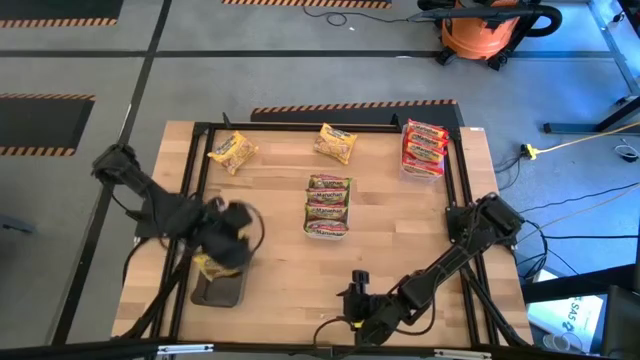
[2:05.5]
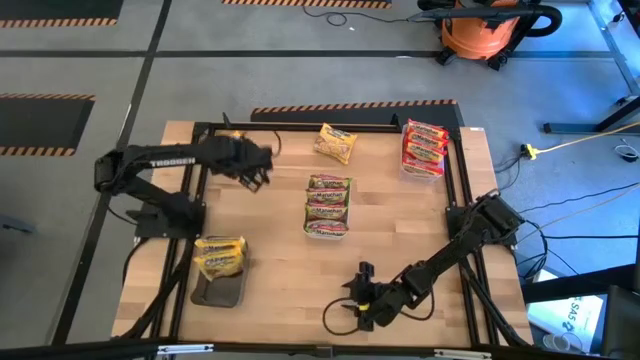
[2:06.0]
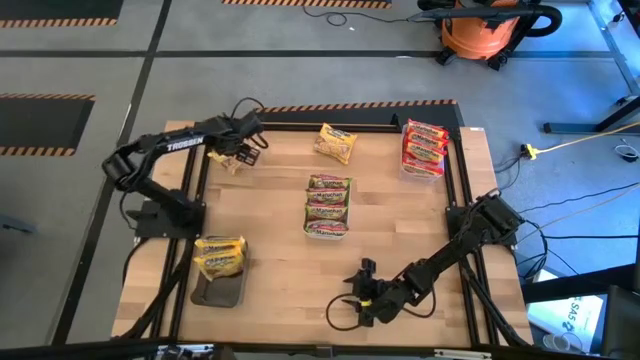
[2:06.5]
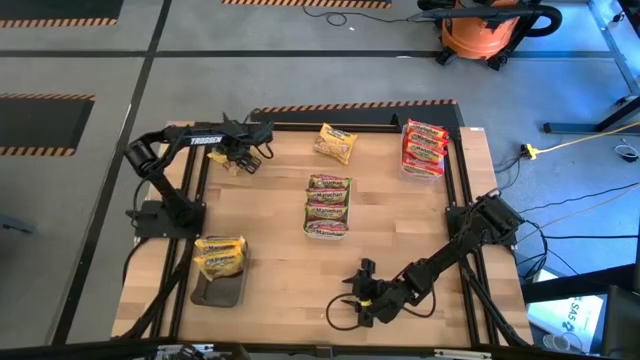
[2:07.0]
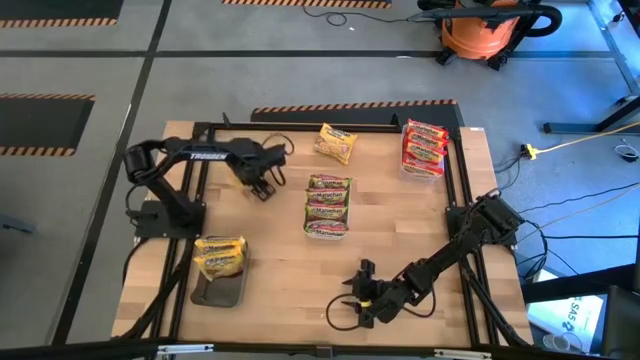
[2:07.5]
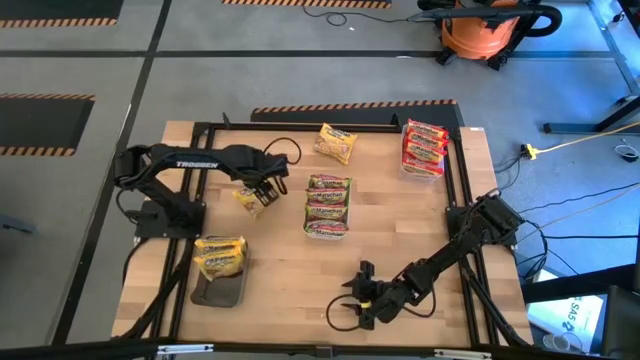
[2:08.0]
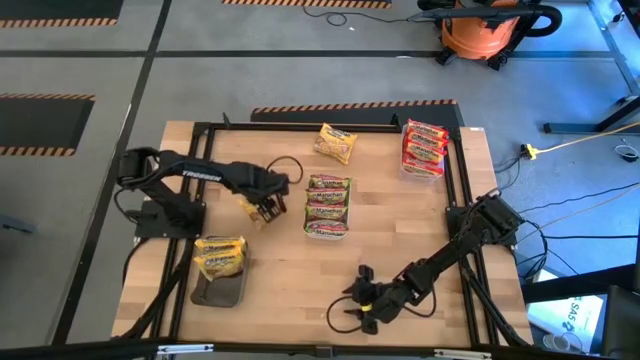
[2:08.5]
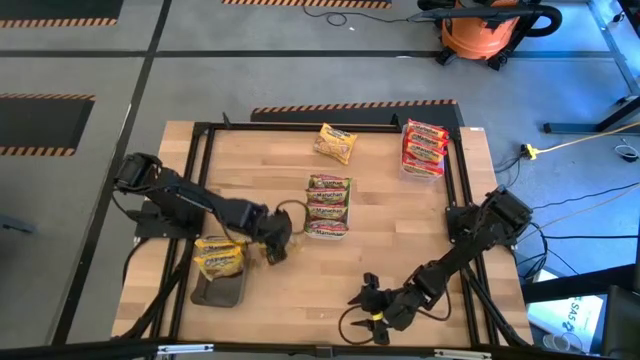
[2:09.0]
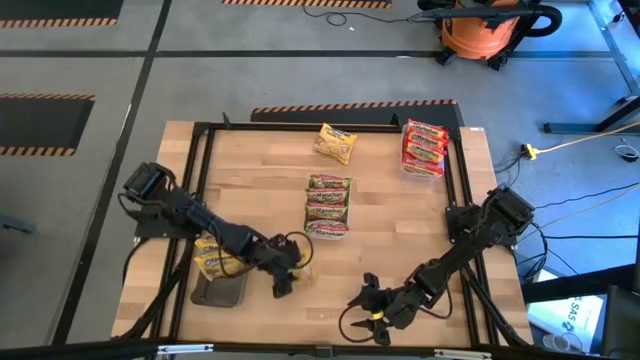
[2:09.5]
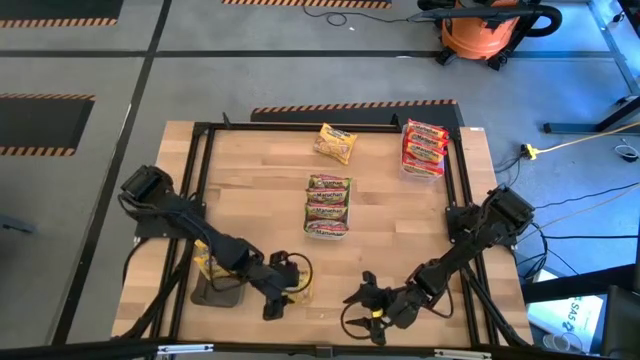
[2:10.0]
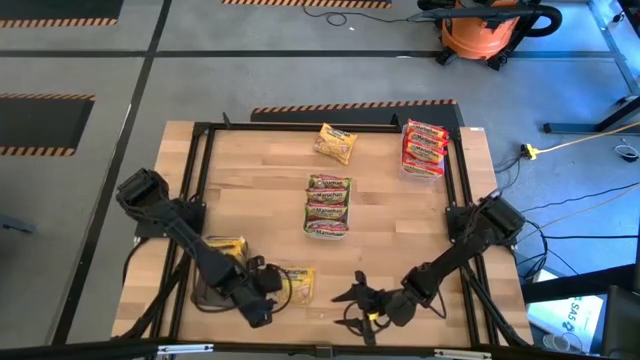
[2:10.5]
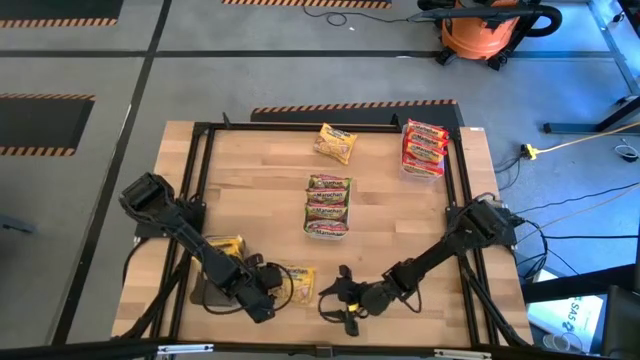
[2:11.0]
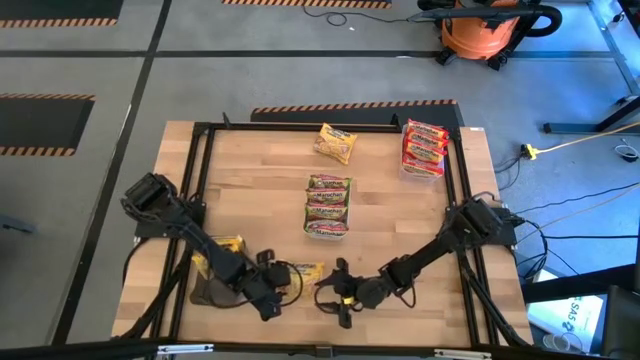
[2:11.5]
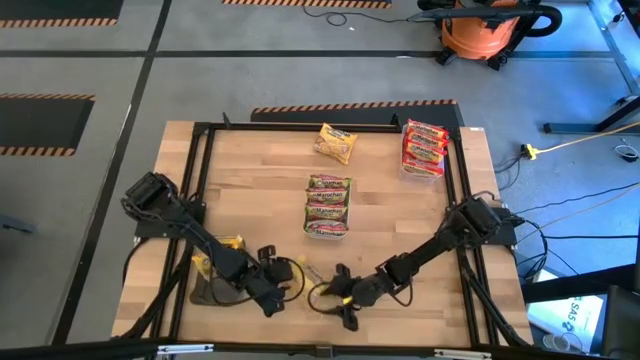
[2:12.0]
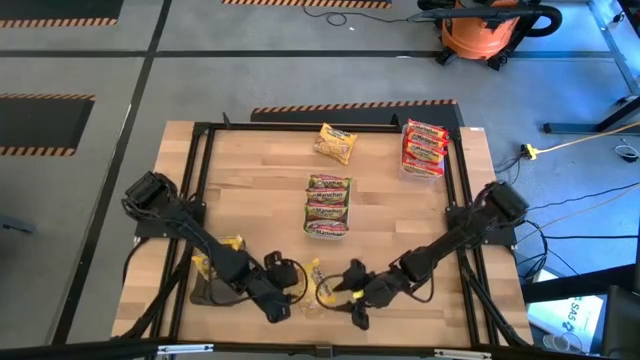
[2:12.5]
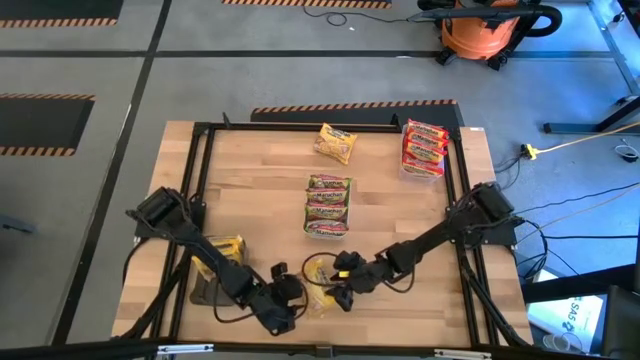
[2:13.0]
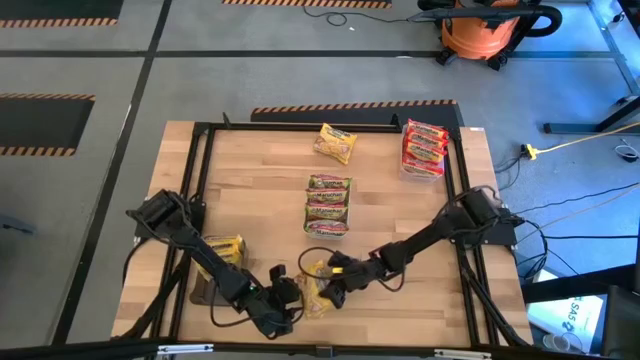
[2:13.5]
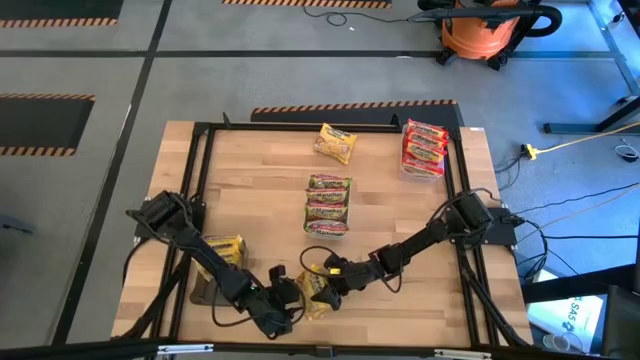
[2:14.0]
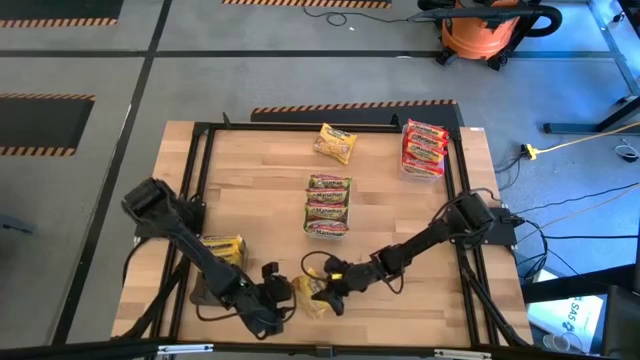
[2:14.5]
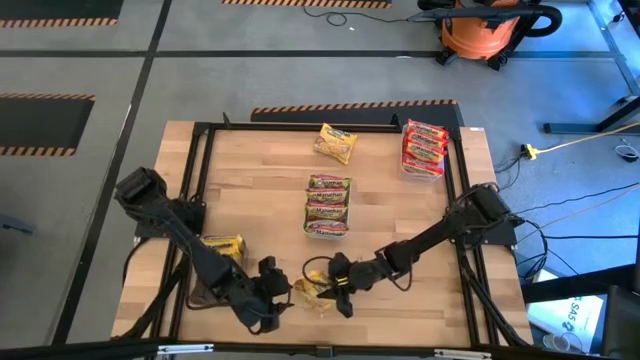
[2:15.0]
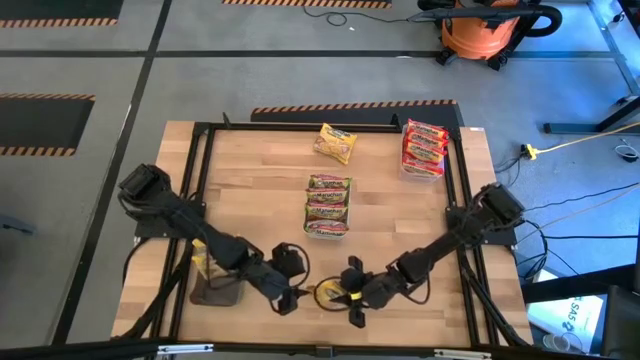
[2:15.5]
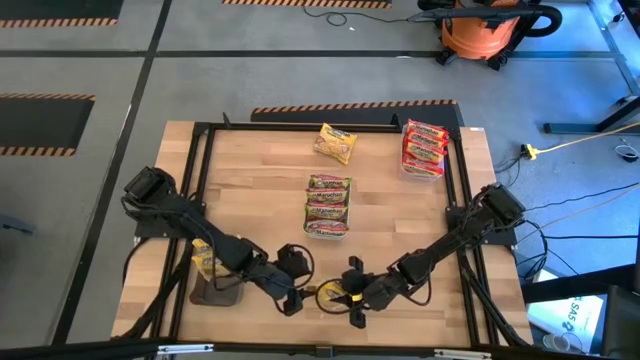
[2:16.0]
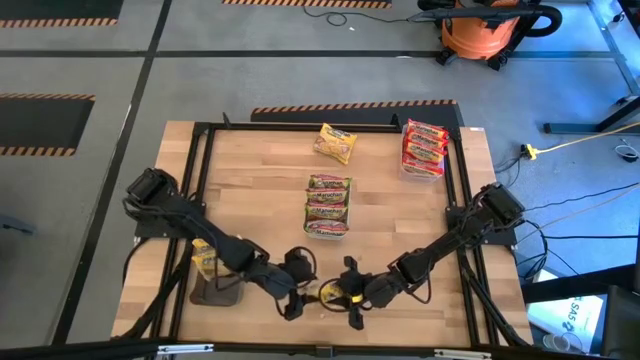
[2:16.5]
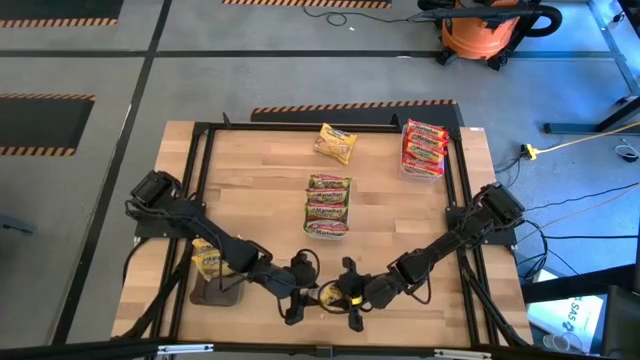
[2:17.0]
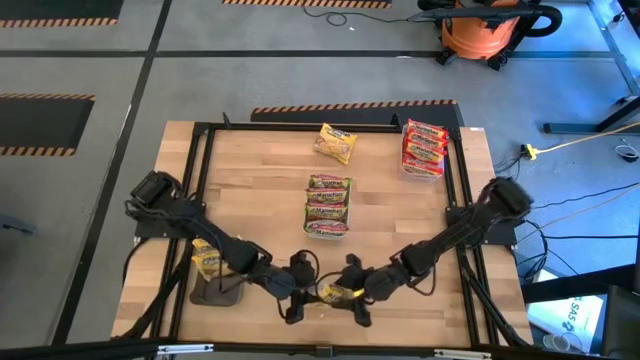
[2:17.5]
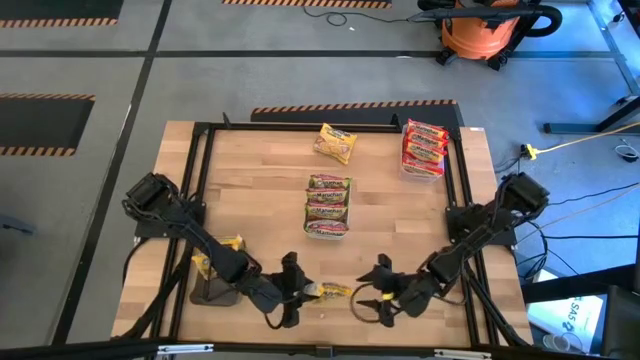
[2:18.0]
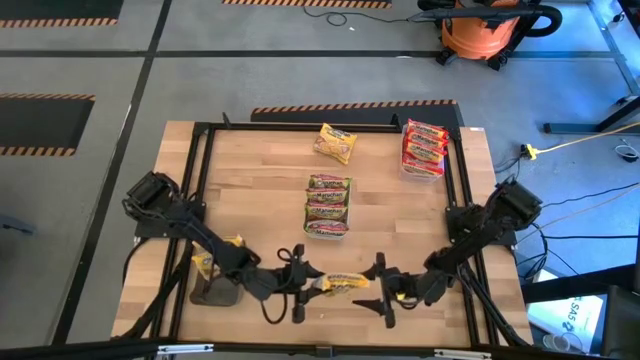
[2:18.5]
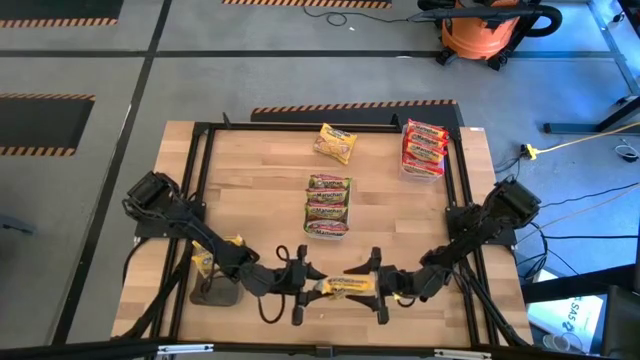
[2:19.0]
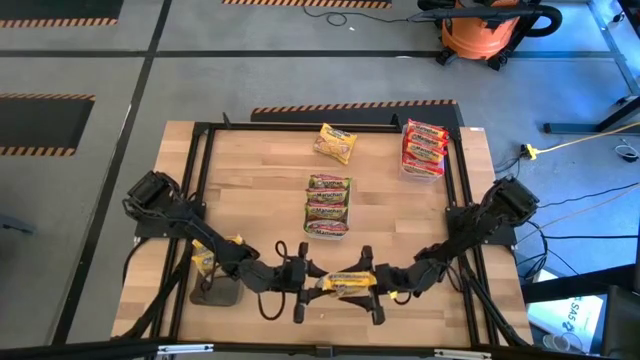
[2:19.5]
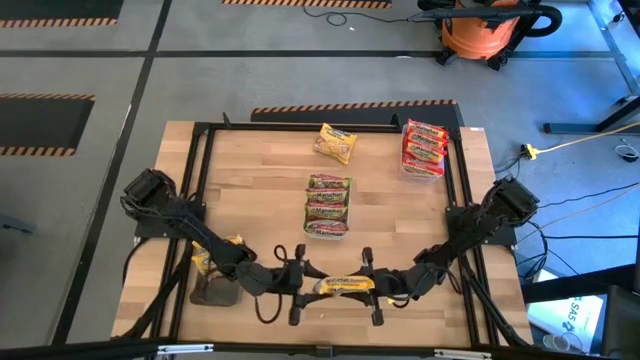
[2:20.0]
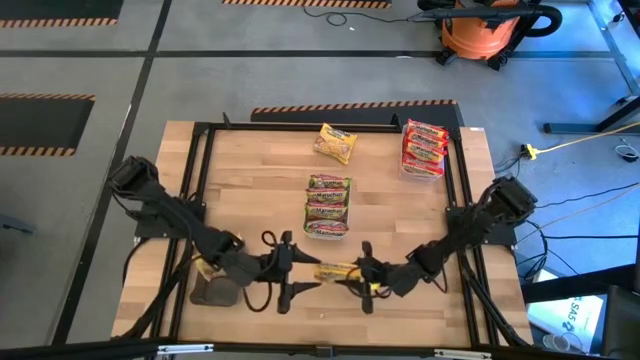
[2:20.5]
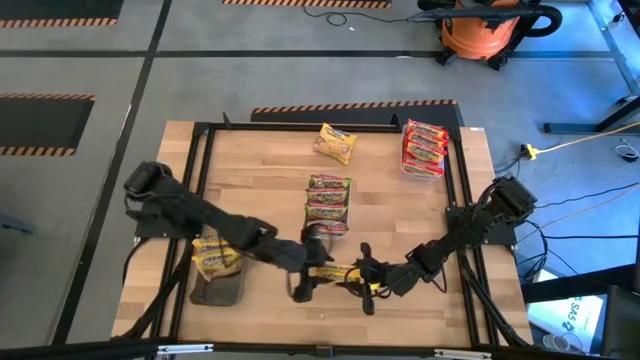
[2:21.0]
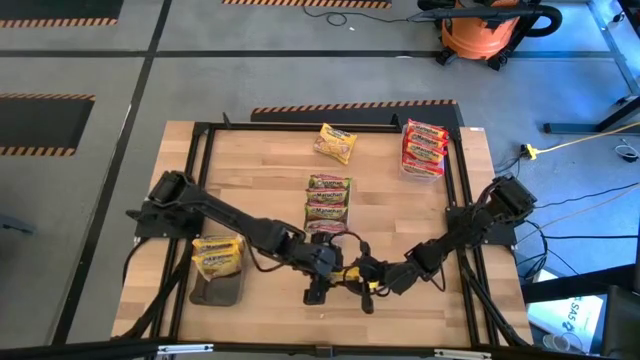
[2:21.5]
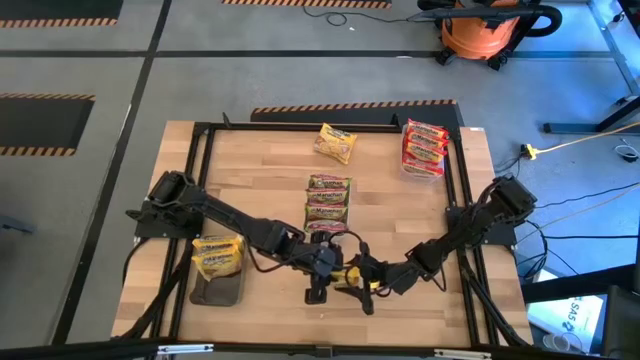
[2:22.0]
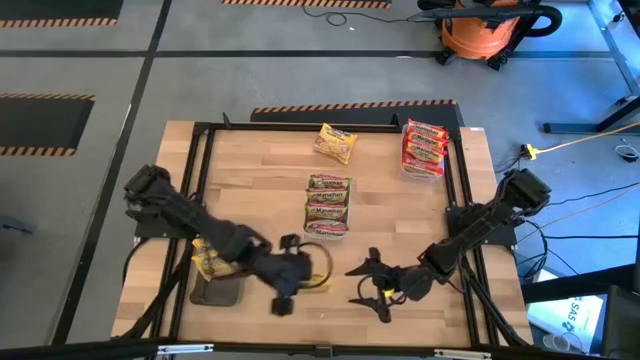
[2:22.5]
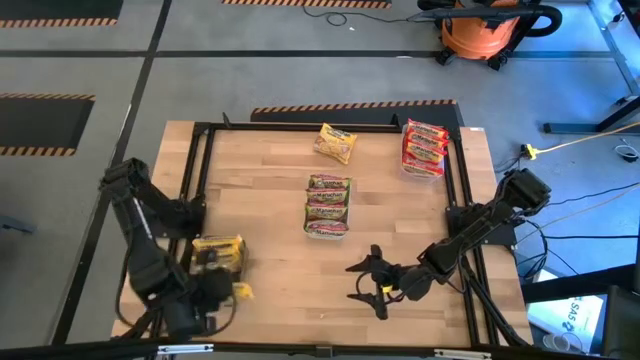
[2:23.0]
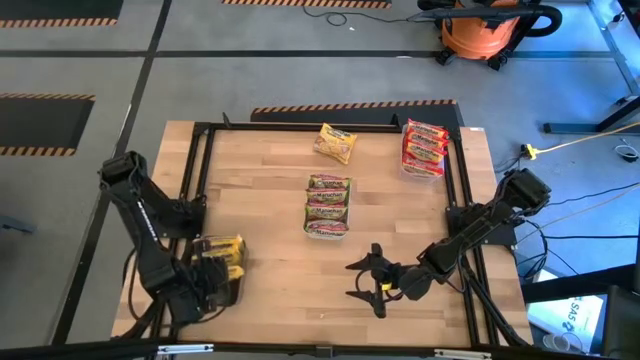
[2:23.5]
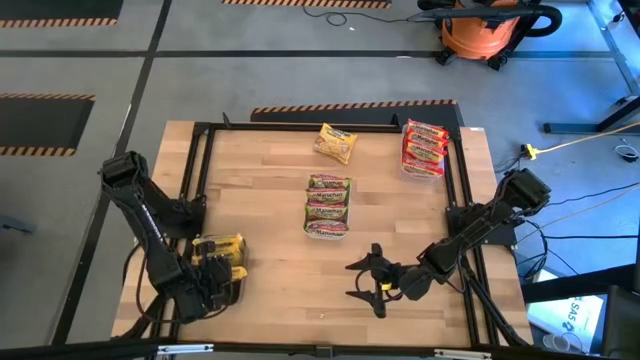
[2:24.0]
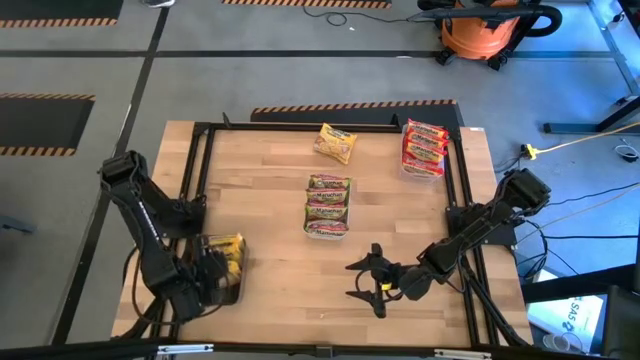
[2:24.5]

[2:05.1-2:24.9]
Task: Sort Maruchan noodles
Put the yellow noodle pack into the black bin

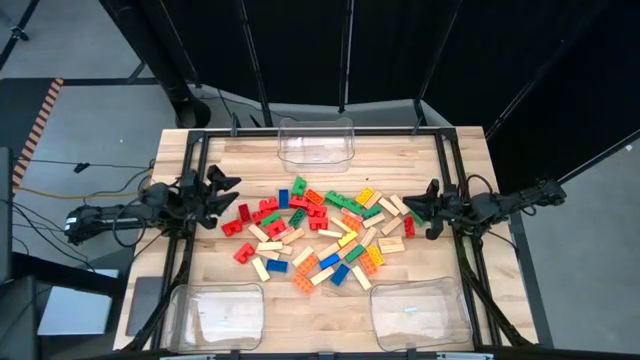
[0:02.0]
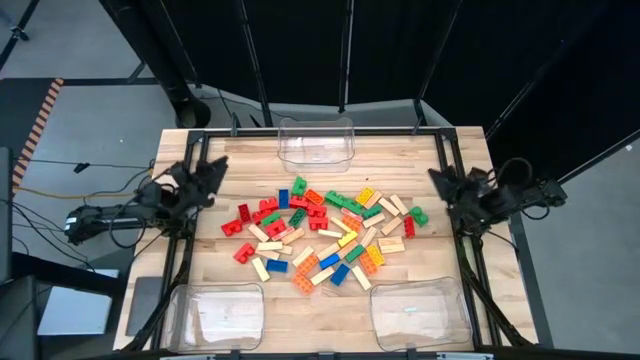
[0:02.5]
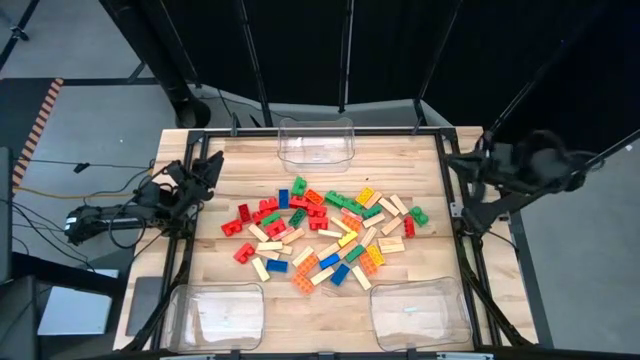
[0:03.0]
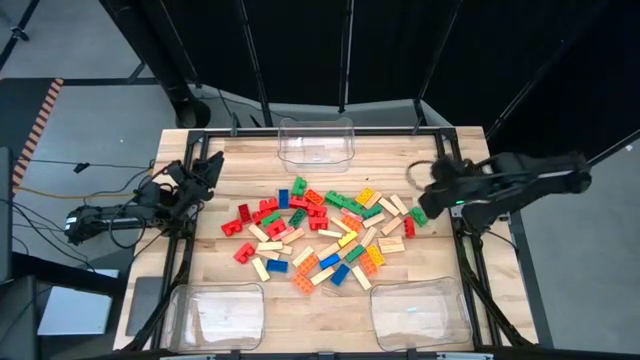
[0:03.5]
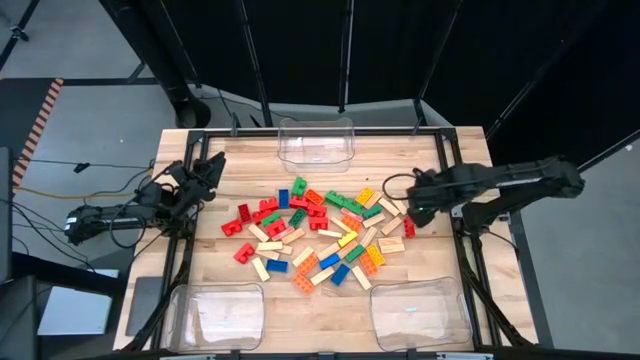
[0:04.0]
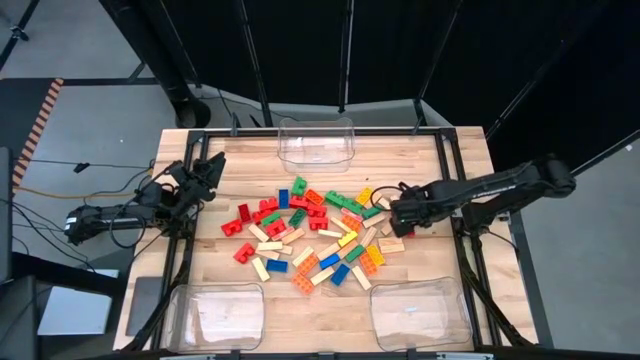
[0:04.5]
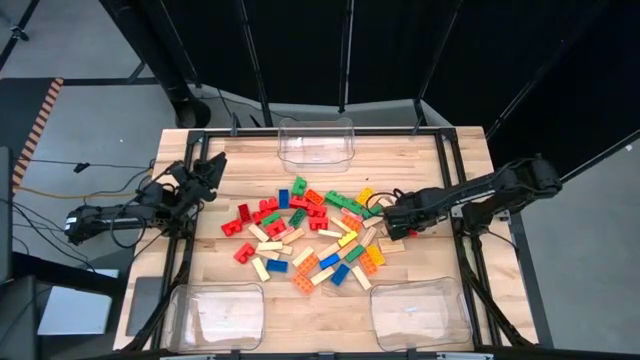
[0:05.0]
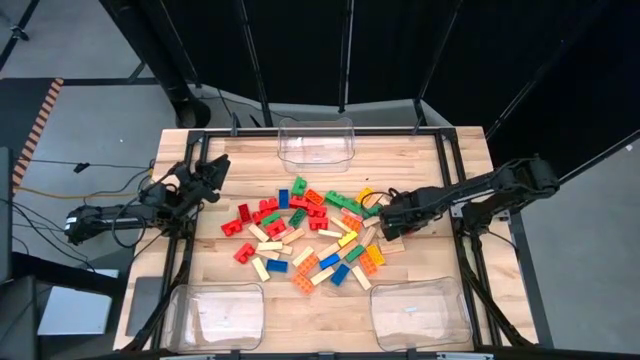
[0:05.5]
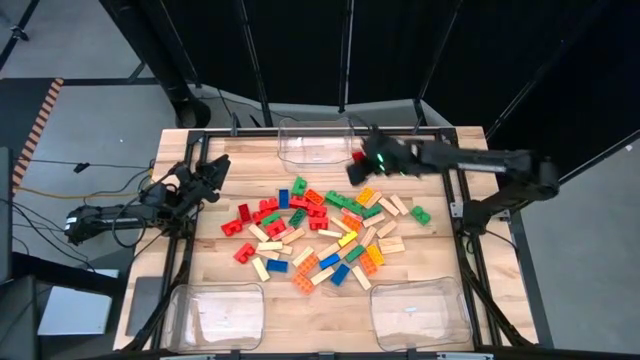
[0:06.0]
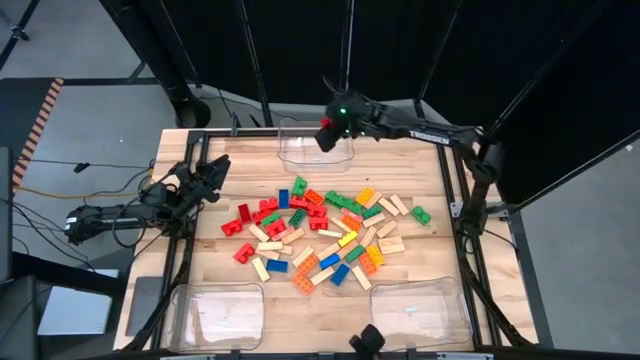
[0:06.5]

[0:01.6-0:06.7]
Task: Sort blocks by size
Put the 4-stud red game piece into the top center transparent bin
